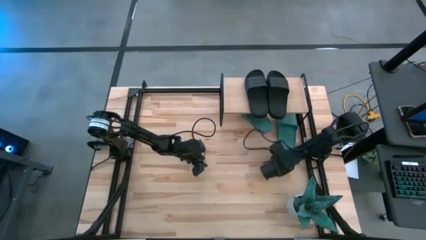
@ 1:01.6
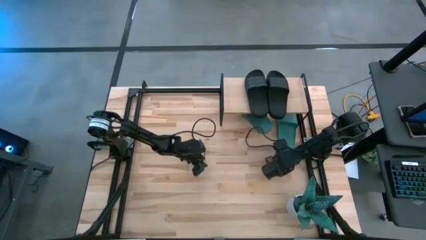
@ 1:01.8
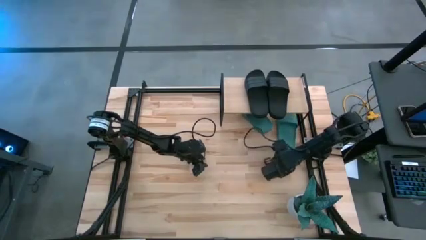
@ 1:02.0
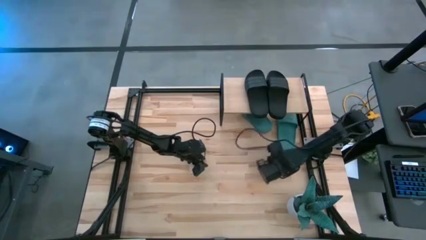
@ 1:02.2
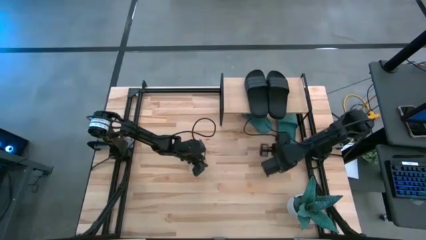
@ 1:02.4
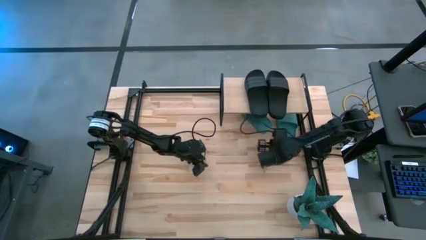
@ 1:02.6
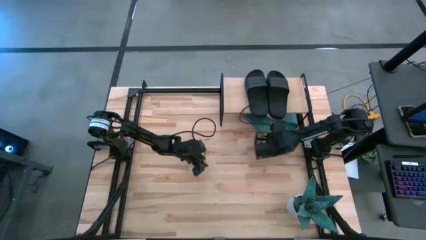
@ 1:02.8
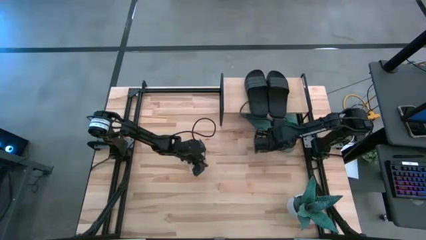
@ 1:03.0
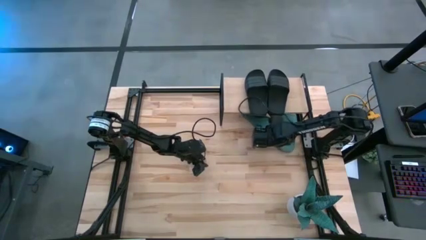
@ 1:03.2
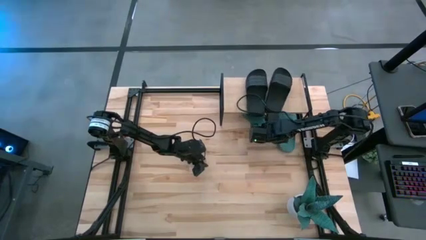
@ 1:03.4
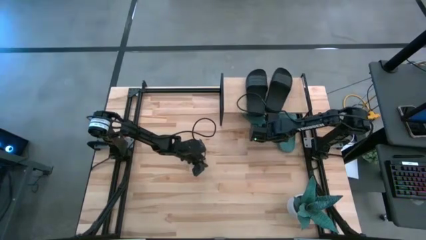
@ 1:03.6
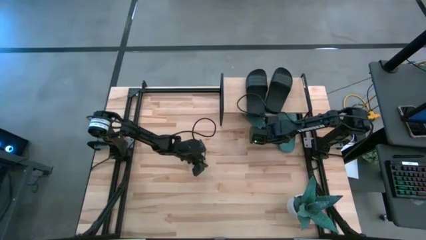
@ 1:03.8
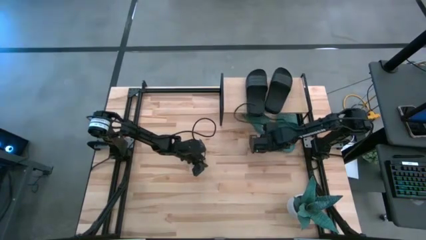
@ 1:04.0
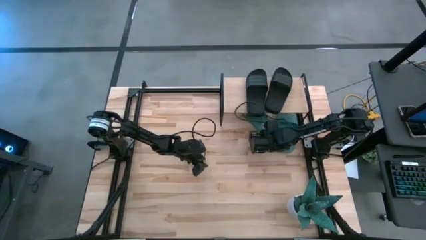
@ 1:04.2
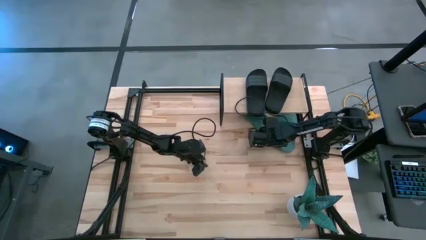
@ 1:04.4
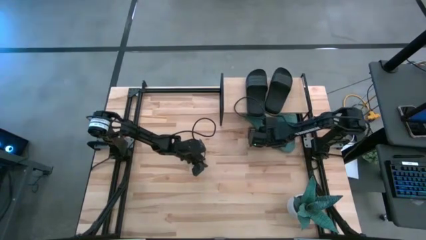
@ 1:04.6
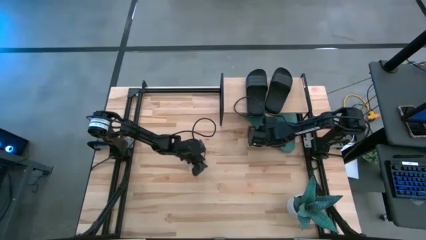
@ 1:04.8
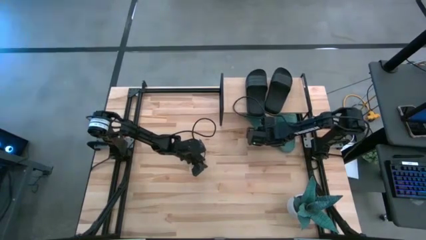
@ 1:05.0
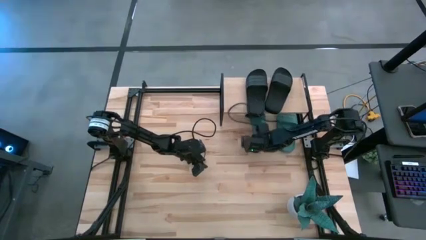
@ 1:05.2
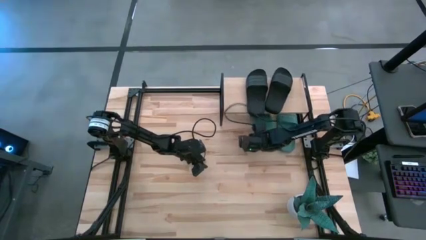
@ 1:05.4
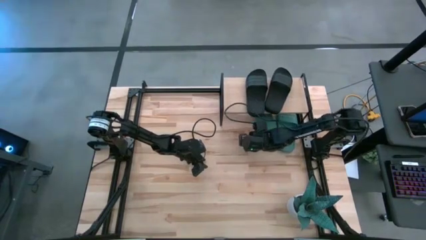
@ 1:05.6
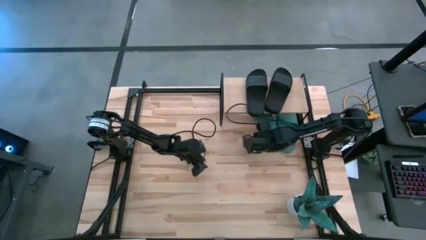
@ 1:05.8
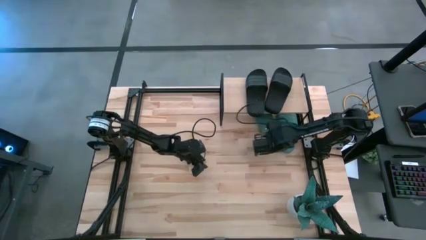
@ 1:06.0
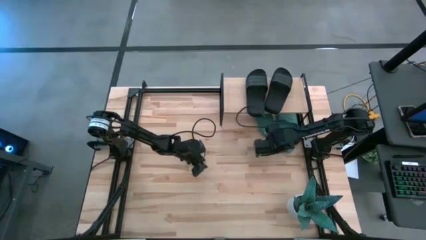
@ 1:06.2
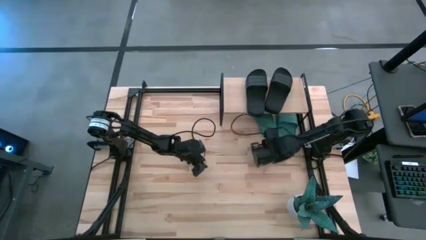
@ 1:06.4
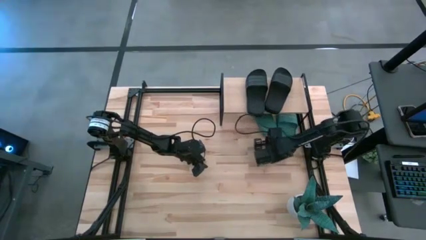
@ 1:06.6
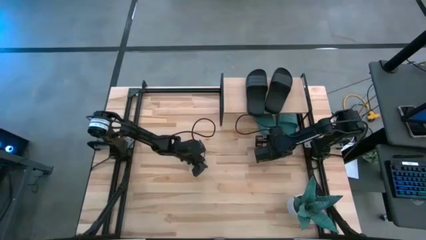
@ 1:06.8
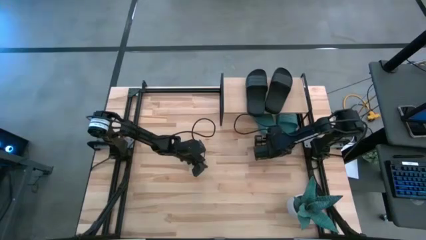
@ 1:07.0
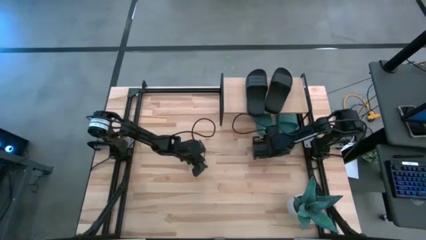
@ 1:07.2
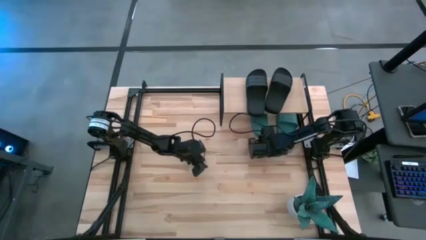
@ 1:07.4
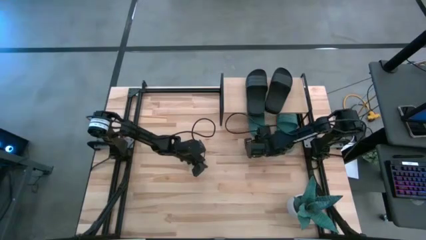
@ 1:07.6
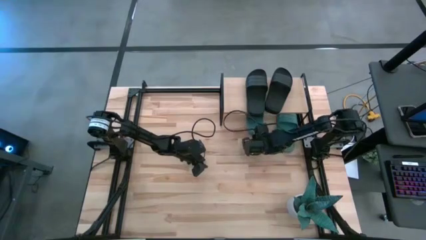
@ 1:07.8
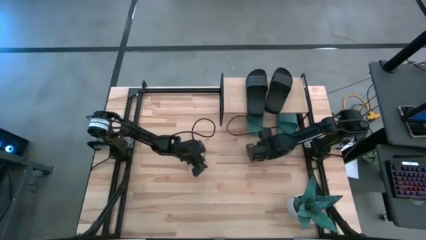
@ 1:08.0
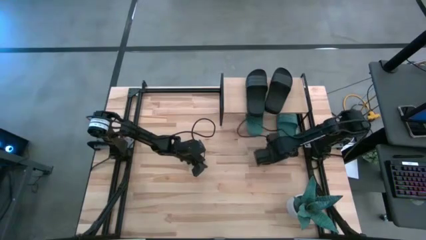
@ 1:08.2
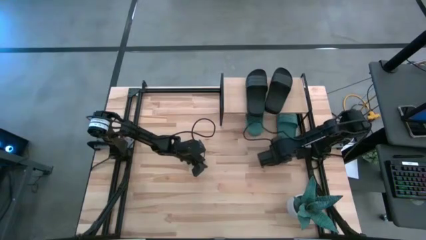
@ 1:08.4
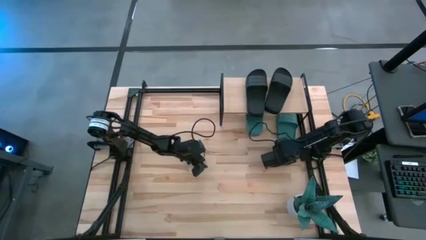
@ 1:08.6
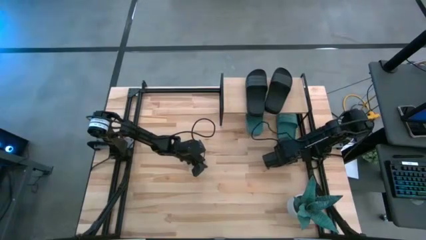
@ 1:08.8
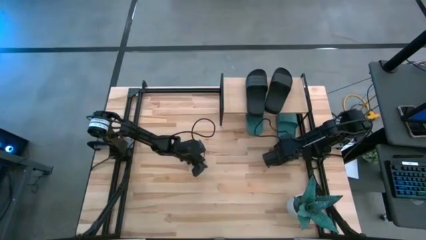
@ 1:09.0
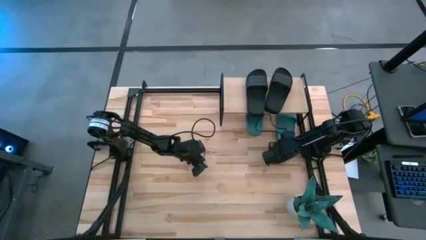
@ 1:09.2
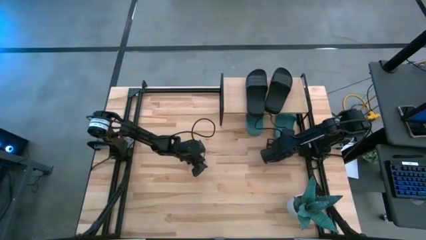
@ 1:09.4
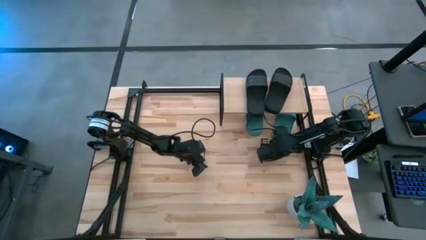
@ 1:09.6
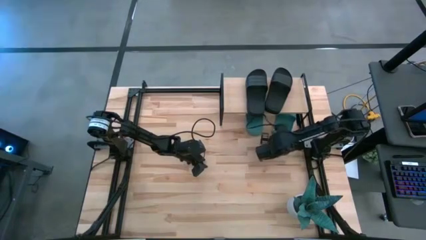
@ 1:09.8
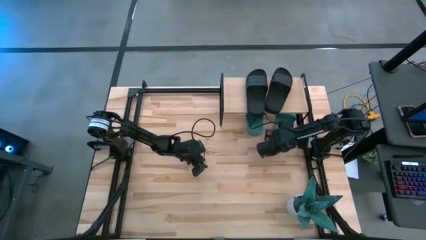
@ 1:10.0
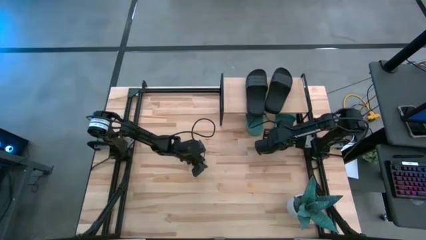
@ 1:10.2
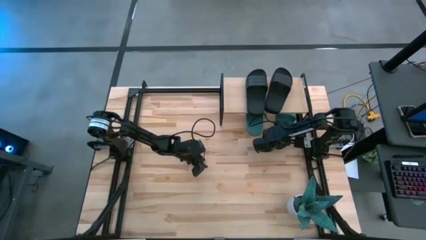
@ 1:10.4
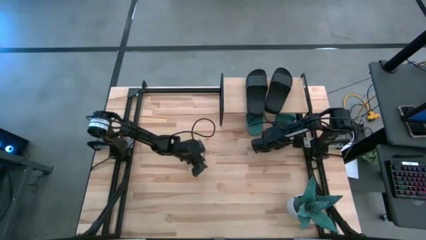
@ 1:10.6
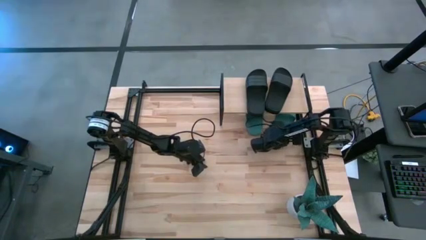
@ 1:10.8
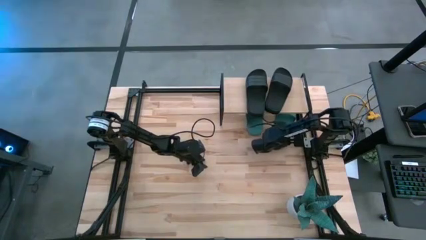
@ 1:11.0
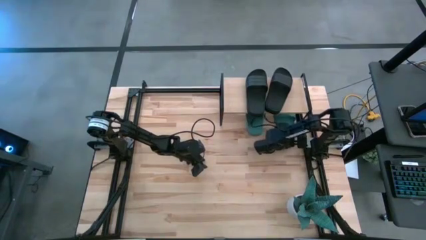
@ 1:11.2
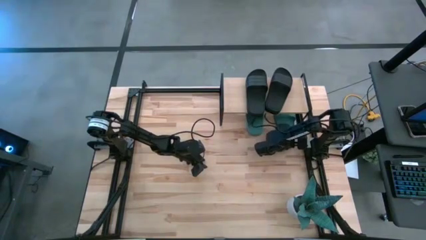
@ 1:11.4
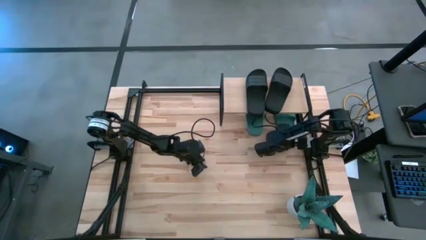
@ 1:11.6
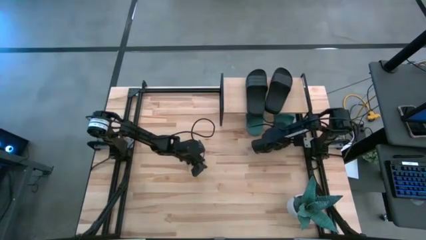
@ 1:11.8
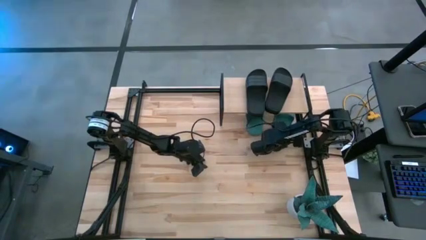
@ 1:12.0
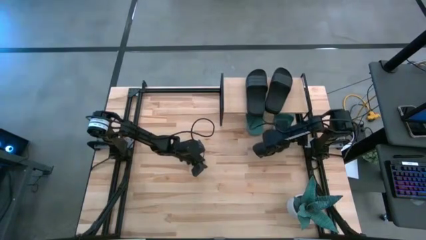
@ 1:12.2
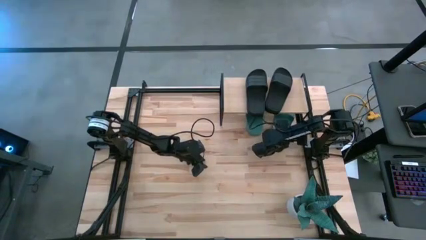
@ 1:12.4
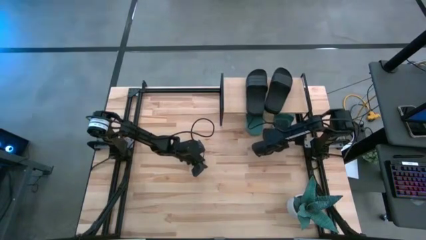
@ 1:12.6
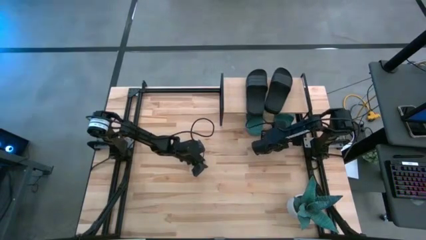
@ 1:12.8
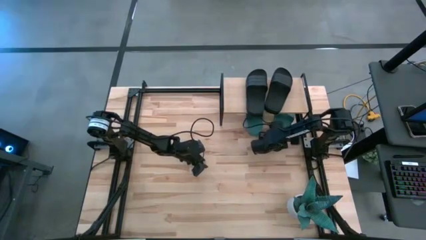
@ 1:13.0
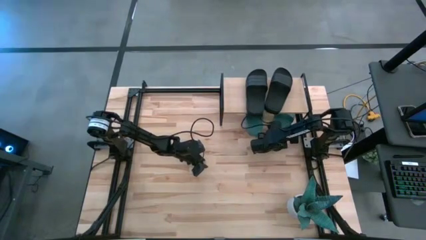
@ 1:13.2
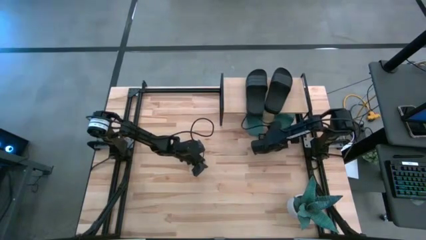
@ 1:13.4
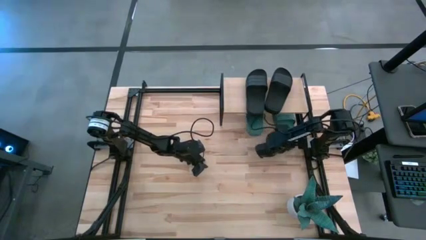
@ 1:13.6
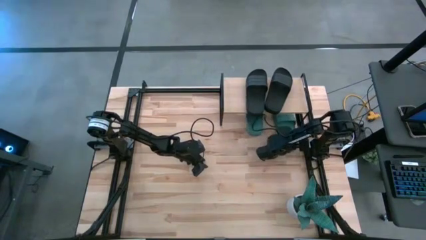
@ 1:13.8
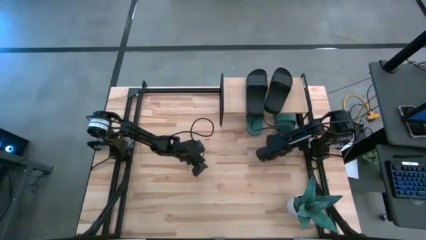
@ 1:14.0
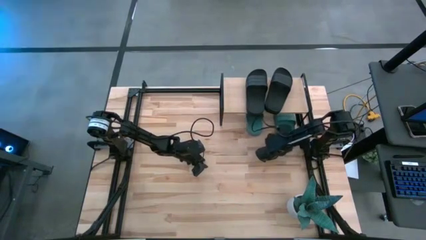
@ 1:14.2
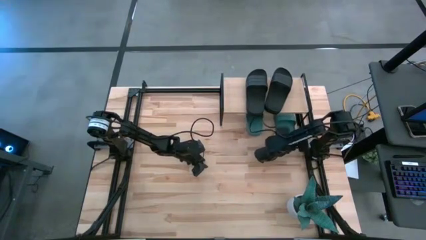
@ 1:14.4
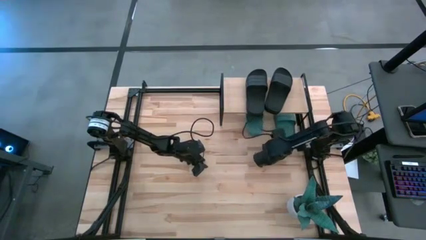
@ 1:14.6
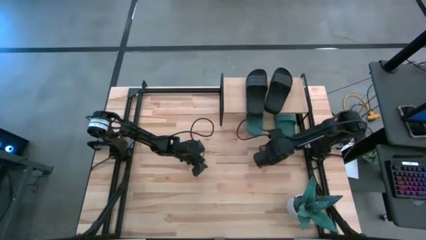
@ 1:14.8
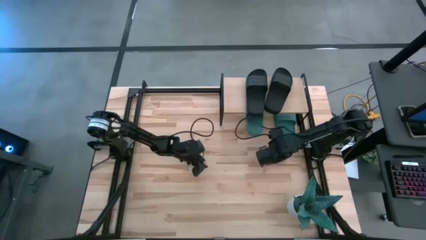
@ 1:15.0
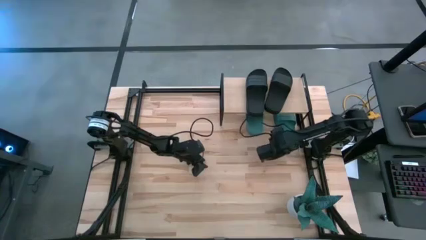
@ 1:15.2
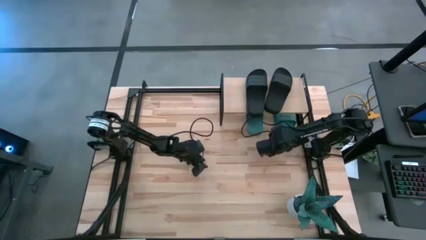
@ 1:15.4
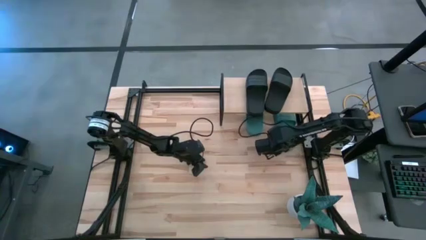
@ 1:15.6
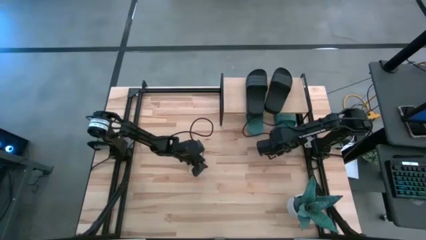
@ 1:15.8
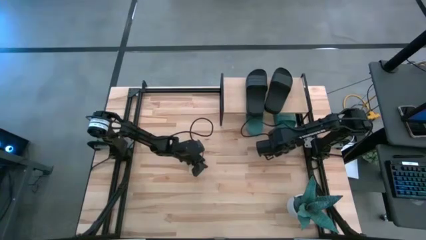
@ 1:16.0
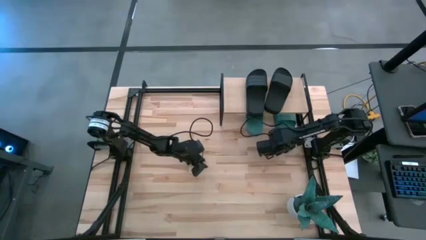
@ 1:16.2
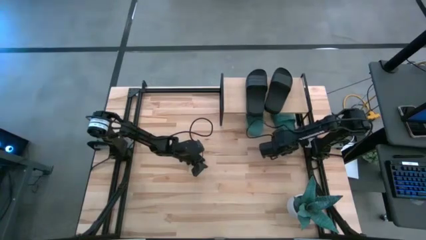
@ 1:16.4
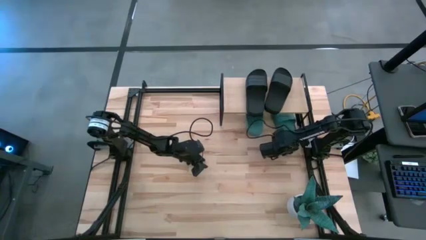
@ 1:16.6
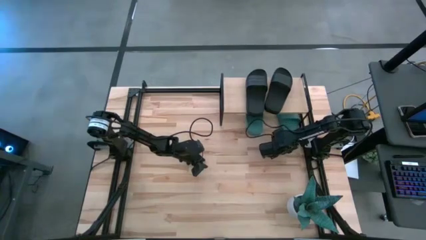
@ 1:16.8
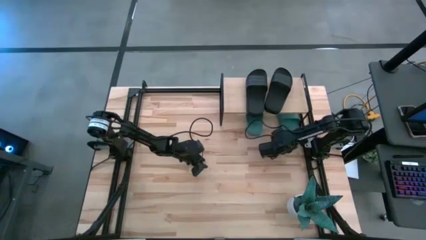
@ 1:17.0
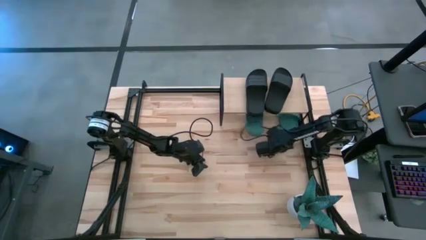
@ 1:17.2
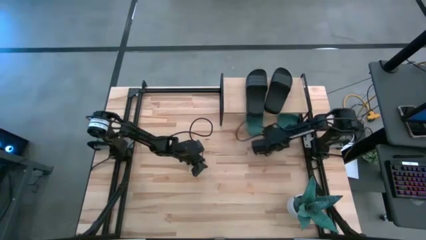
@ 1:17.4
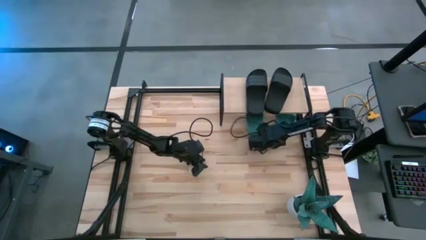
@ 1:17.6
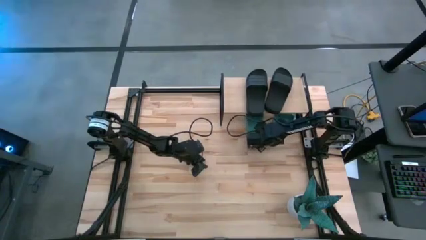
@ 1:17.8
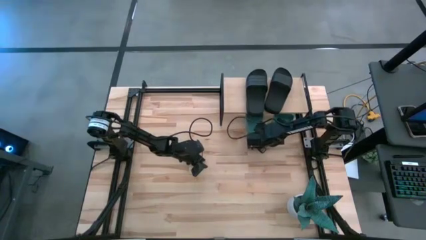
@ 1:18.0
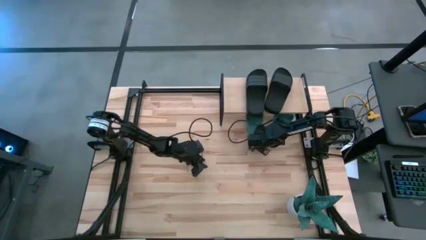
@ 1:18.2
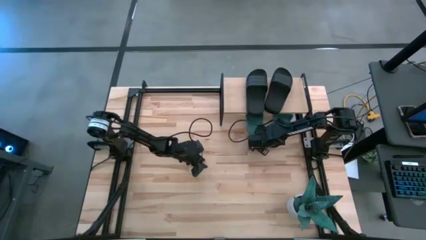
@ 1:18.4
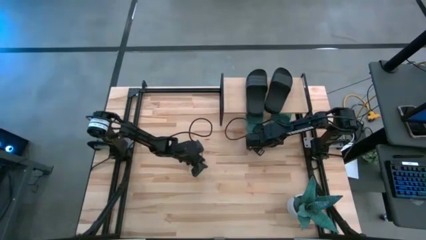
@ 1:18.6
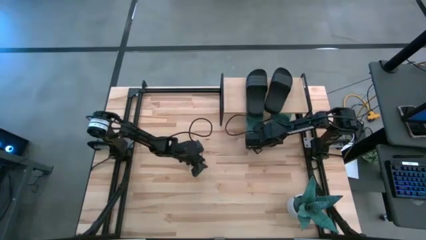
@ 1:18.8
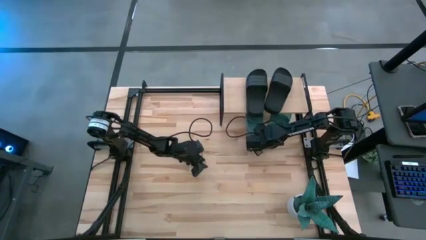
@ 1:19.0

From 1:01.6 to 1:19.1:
Task: Pick and place slides into the shelf
Adjust the green slippers under the shelf
